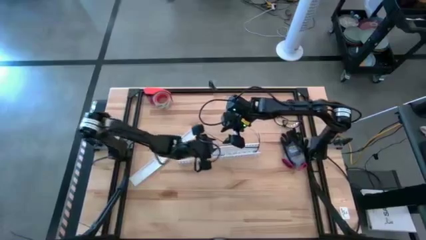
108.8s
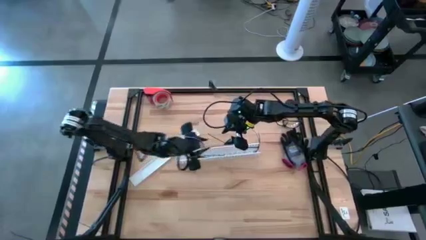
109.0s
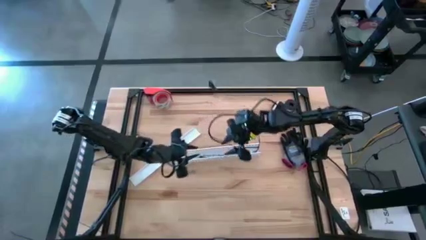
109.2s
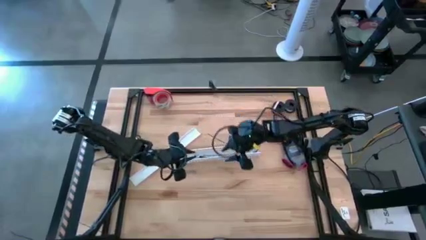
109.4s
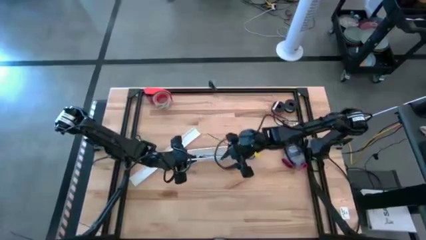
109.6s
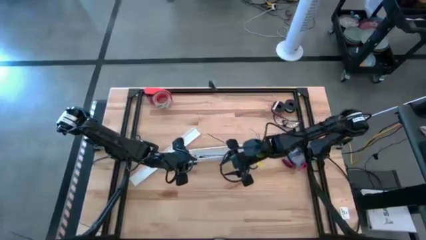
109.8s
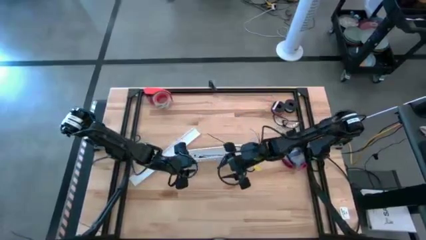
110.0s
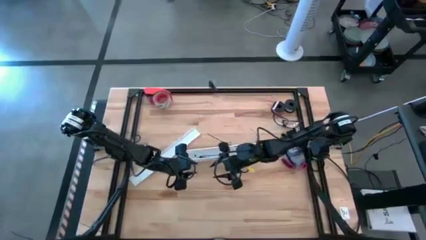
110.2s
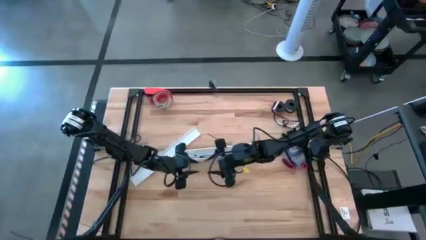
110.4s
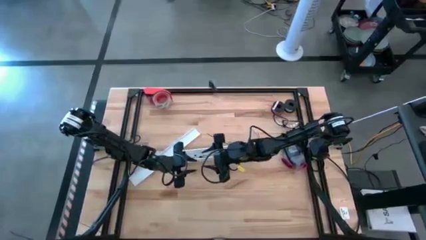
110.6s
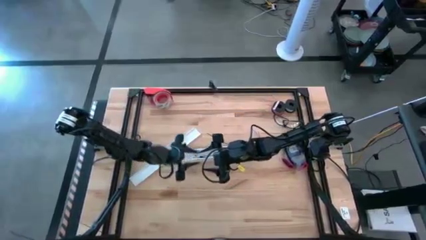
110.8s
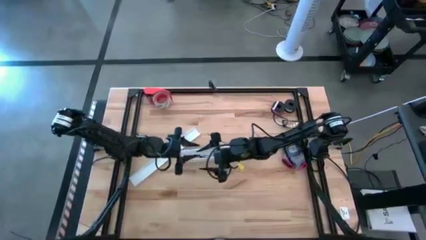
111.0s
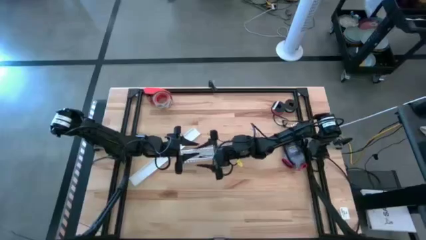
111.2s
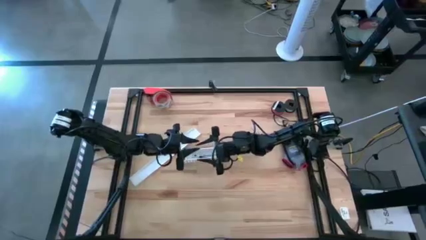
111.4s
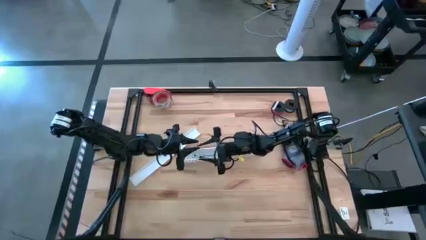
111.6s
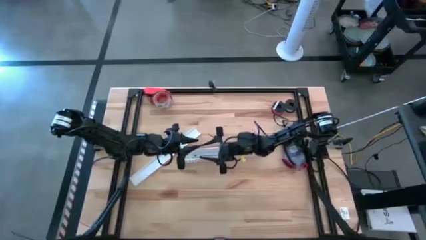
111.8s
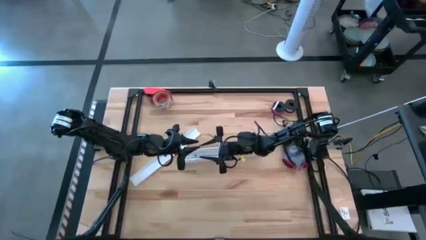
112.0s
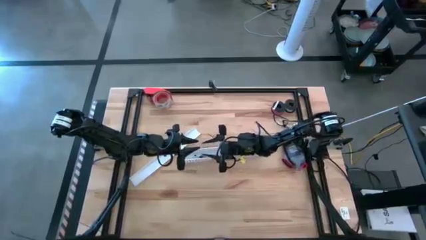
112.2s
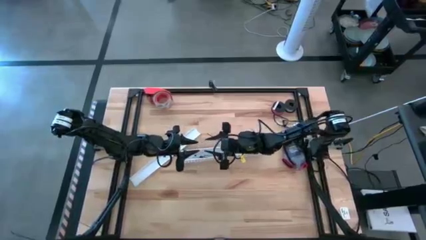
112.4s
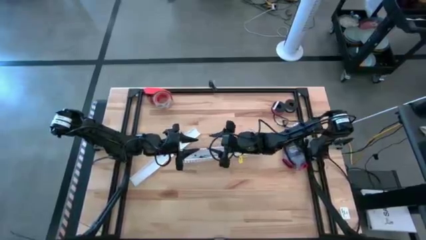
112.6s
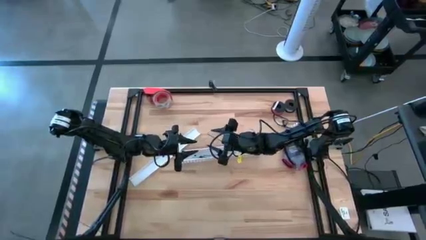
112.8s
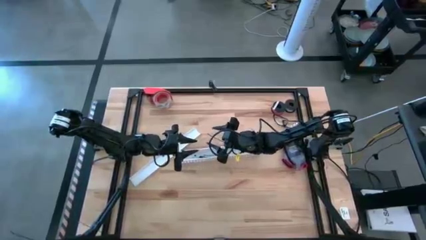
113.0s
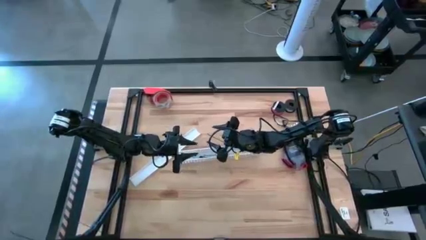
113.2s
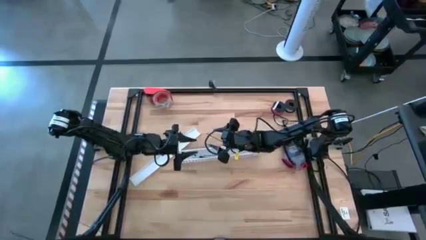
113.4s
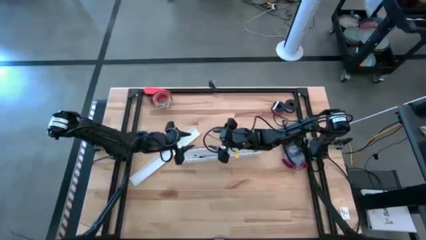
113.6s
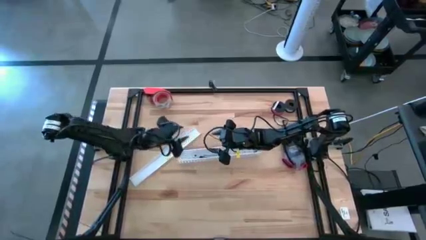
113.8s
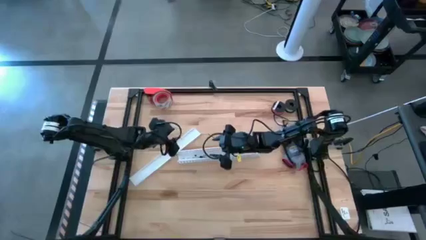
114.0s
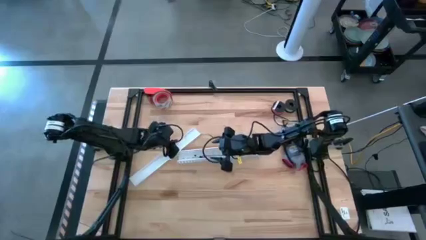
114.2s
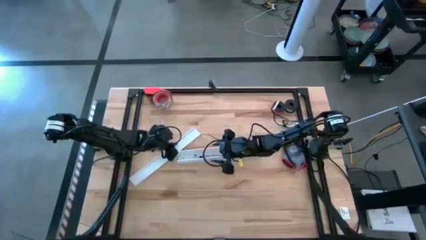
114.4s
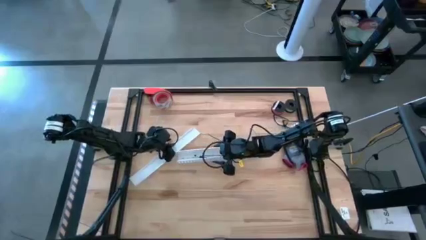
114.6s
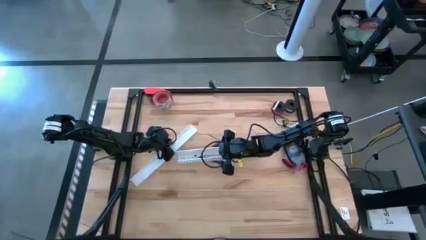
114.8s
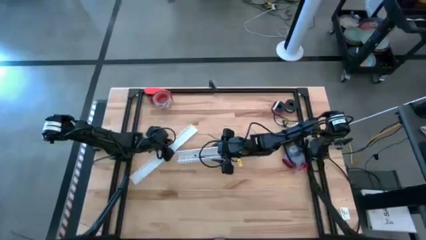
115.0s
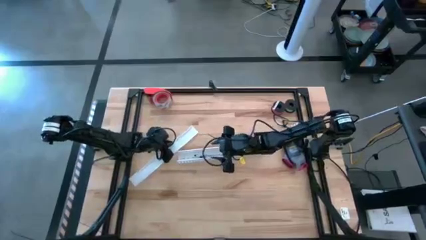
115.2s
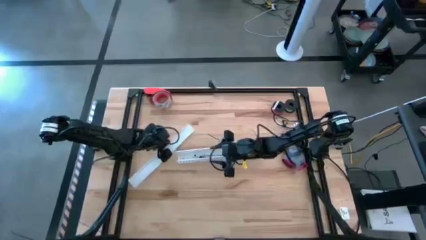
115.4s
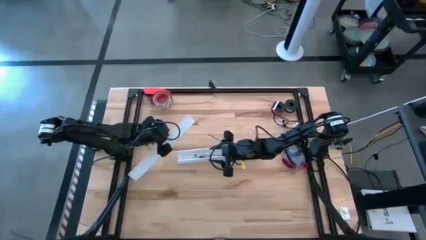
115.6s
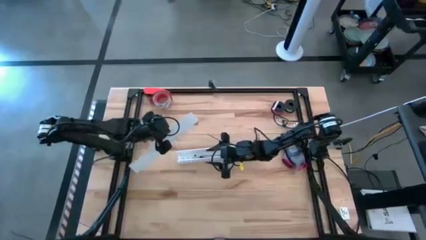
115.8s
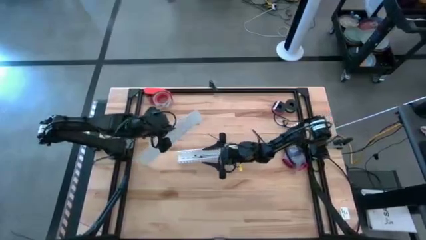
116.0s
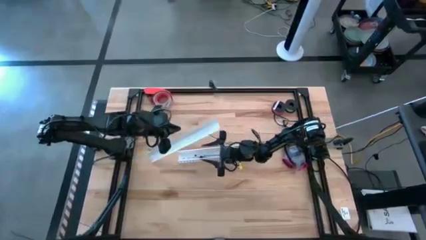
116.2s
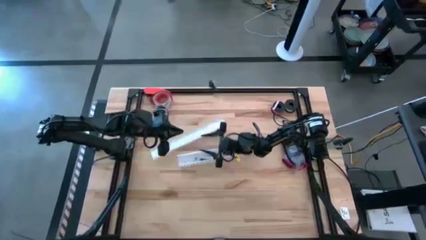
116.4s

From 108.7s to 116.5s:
Task: Ziptie cables
Close the white cable duct

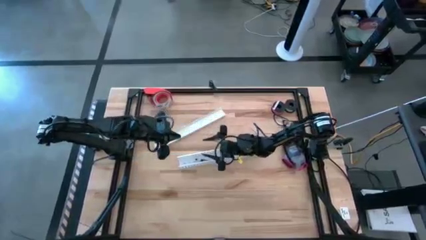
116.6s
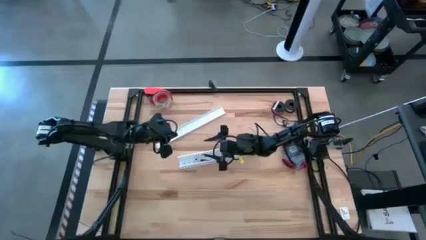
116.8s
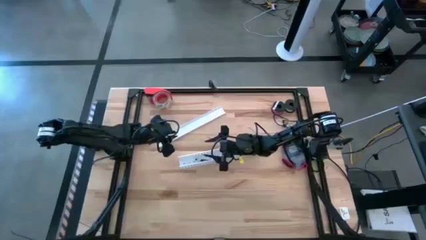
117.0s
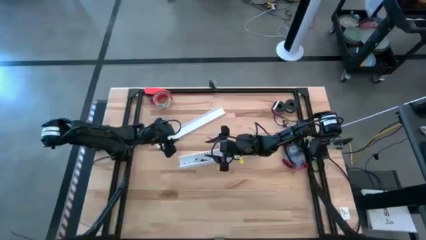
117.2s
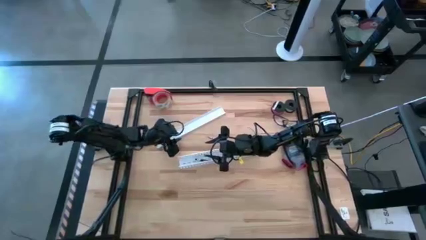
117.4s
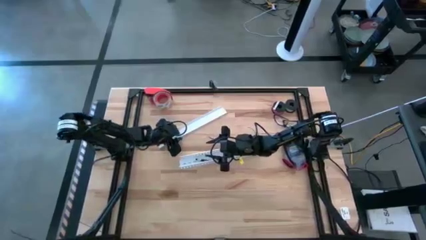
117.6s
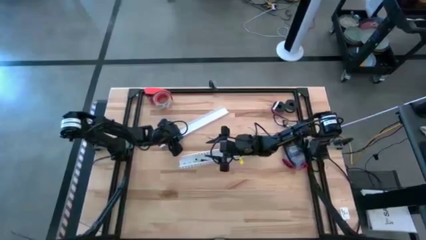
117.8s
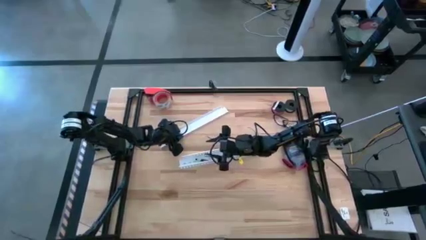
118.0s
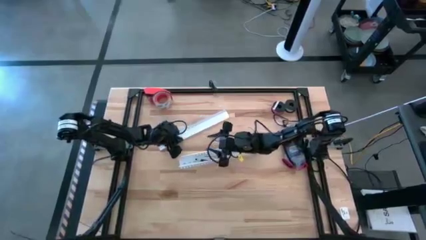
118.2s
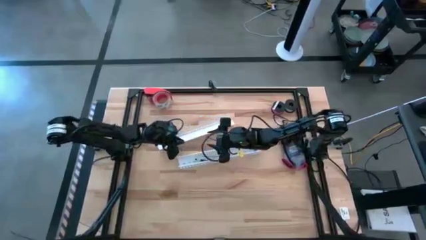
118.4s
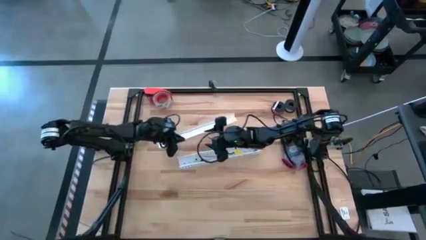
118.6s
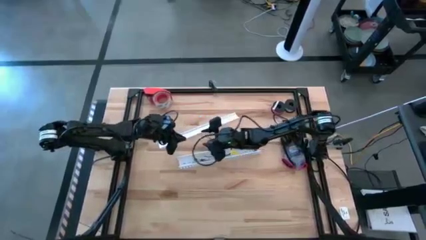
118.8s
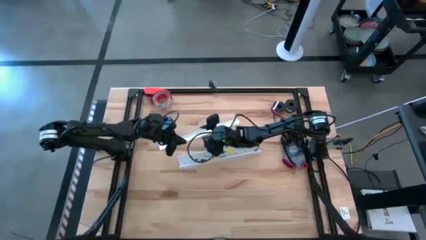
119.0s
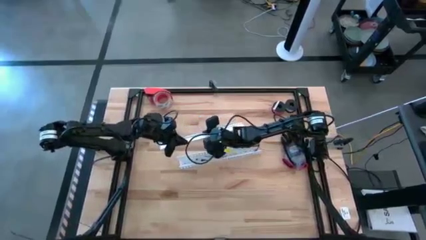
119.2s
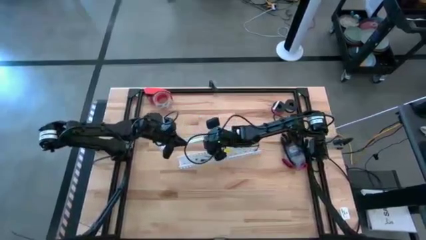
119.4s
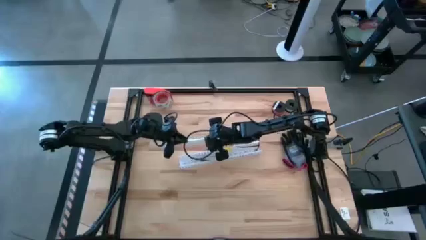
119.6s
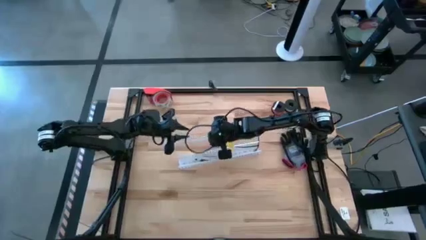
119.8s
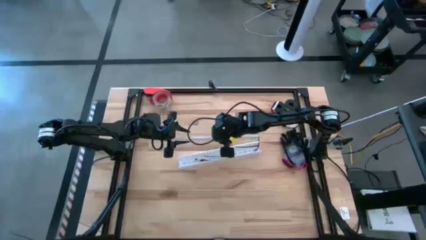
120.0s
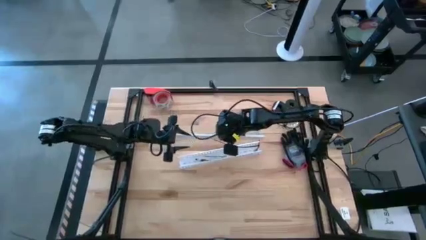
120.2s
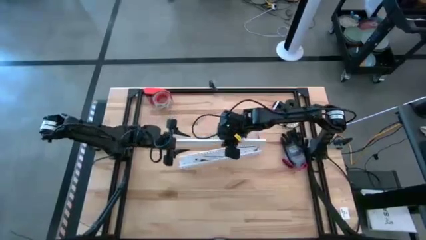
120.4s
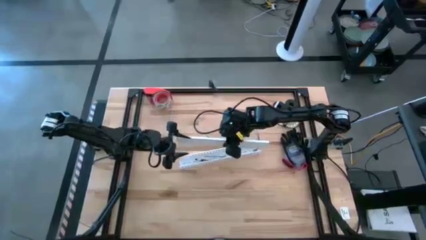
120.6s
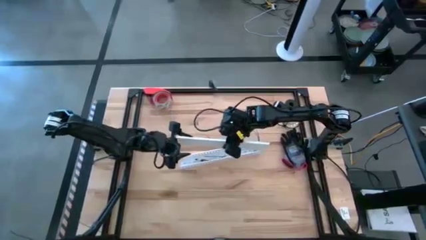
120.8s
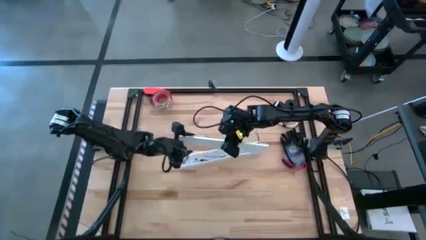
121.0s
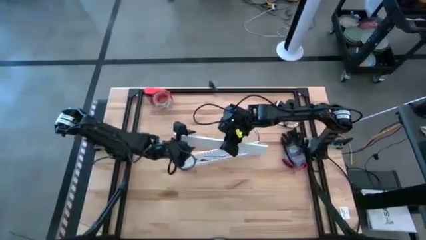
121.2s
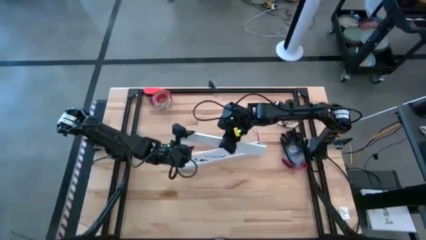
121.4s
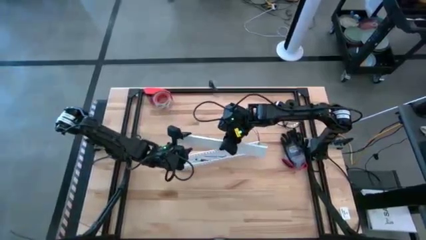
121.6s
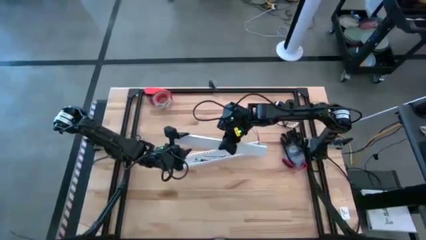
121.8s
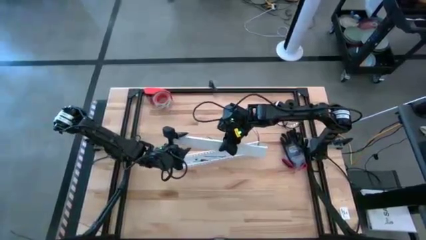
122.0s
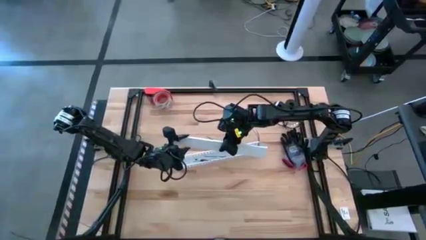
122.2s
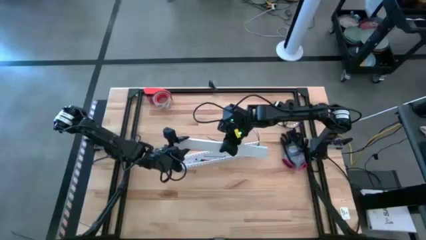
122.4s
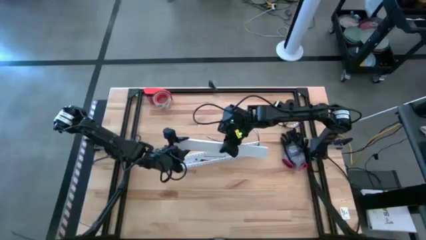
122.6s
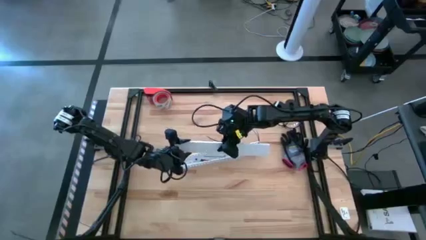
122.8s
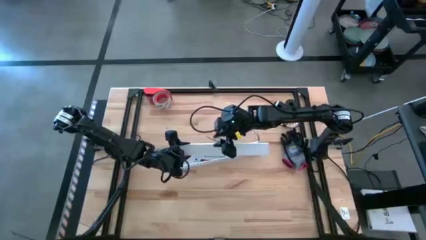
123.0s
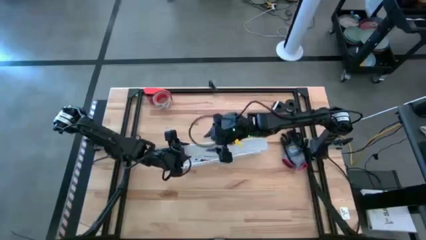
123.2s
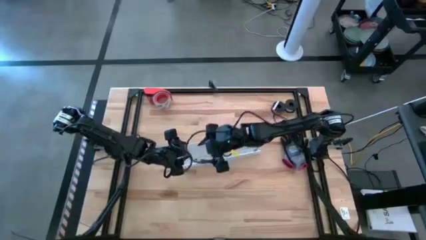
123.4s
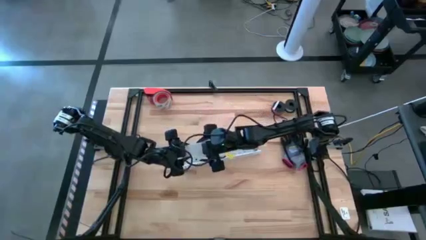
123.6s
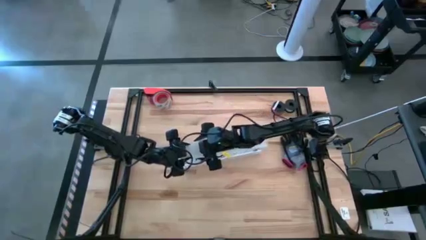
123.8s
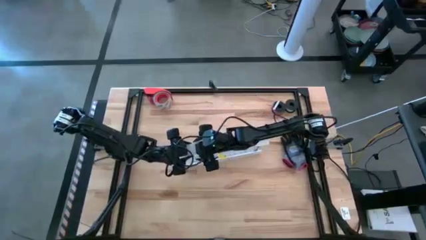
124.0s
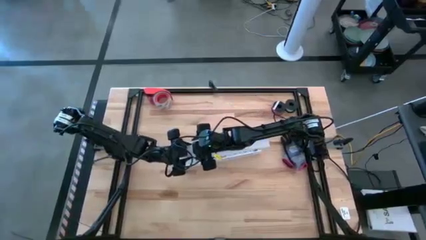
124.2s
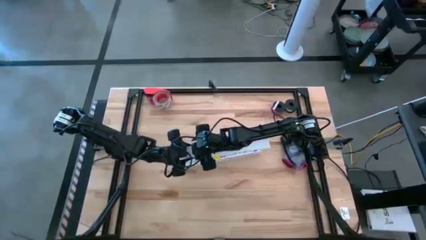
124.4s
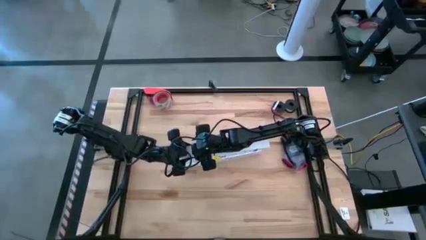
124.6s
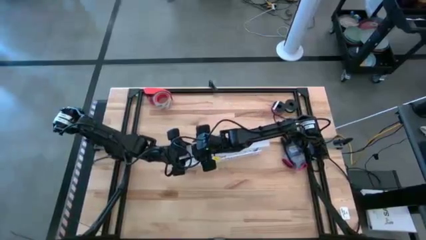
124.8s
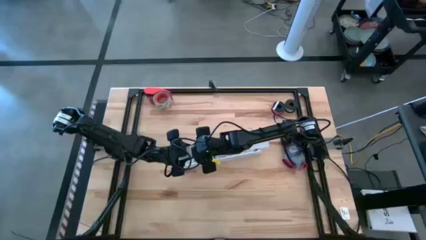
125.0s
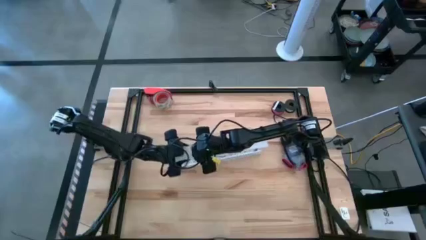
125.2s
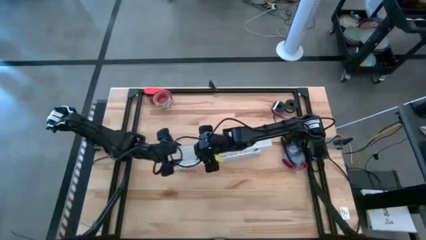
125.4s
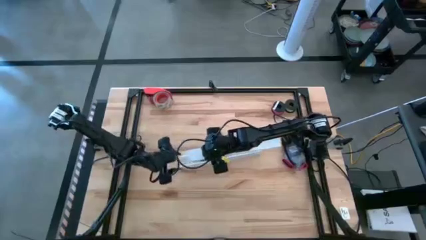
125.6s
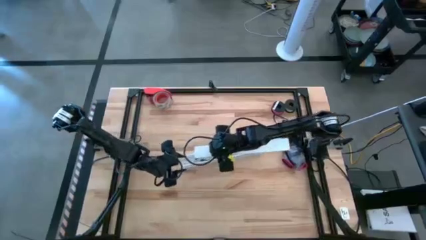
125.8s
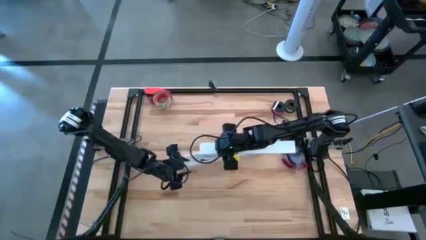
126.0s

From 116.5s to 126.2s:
Close the white cable duct
